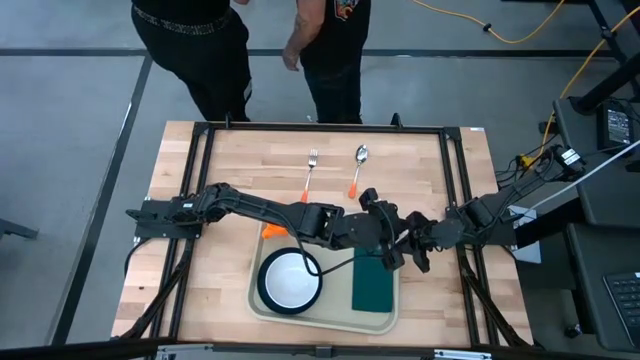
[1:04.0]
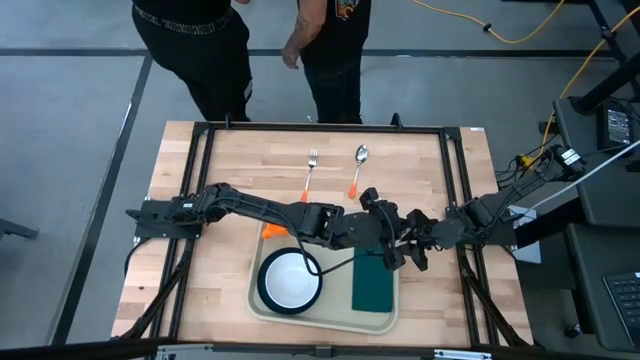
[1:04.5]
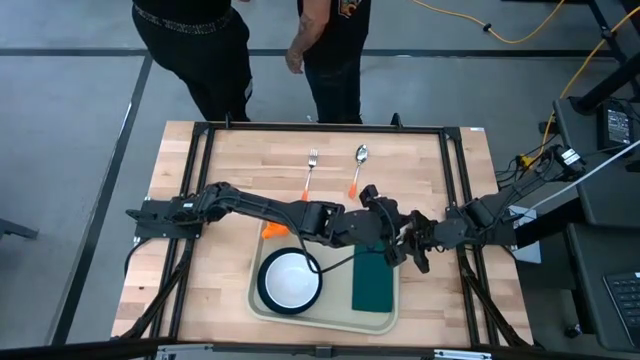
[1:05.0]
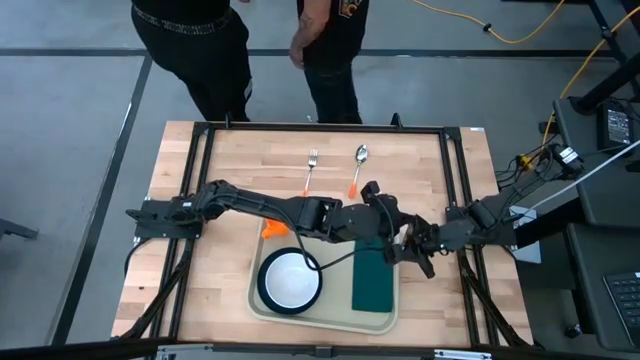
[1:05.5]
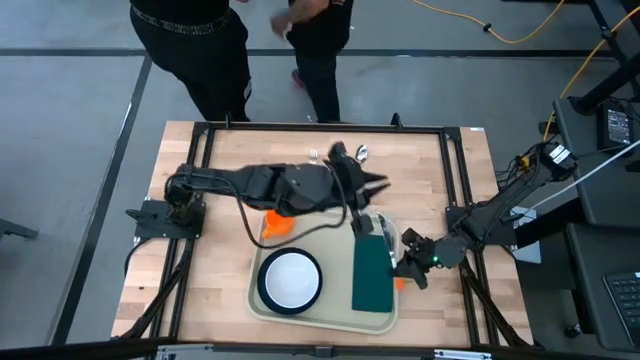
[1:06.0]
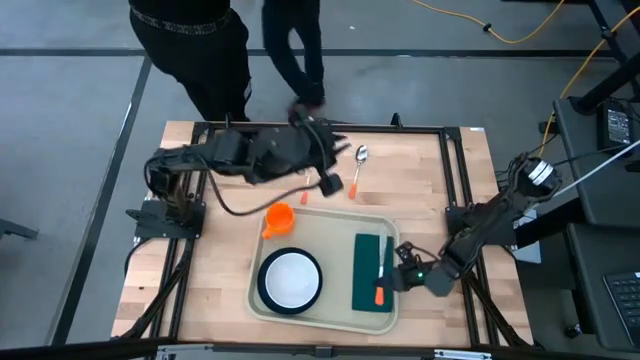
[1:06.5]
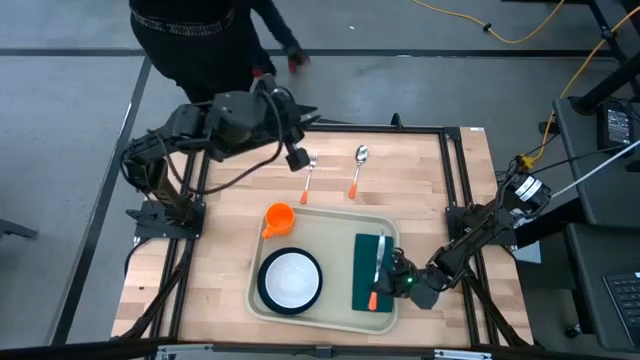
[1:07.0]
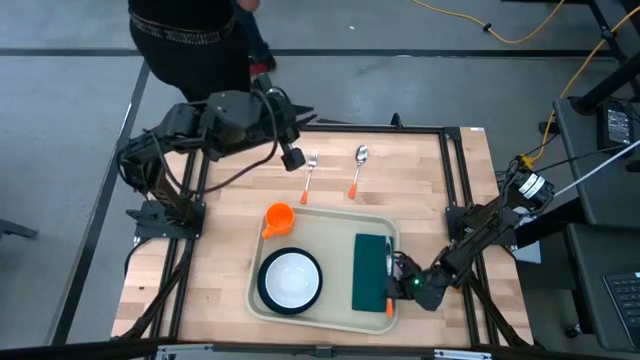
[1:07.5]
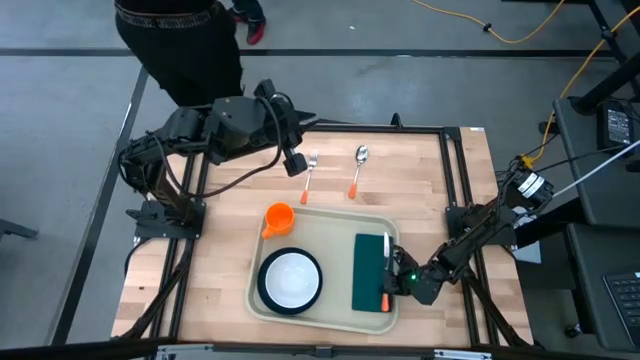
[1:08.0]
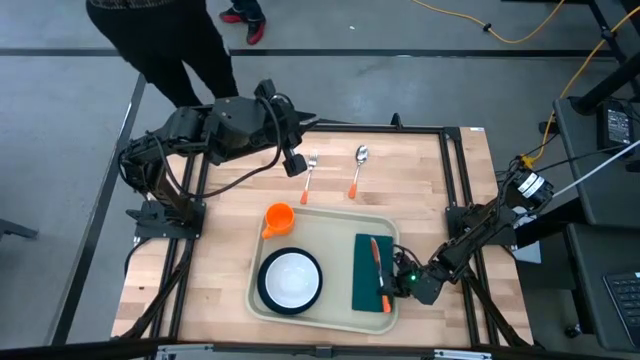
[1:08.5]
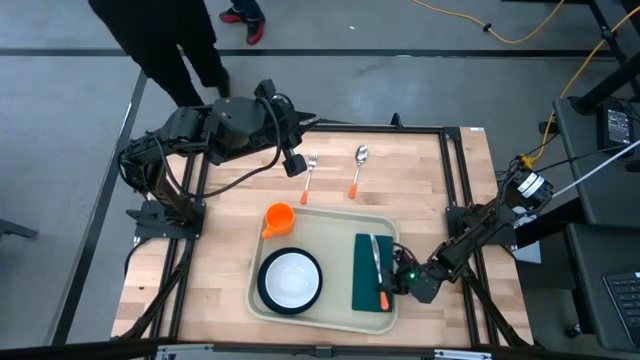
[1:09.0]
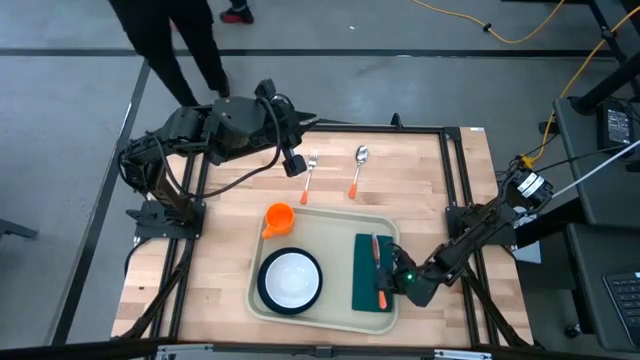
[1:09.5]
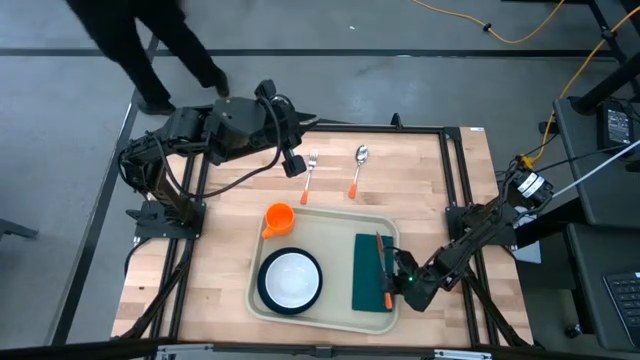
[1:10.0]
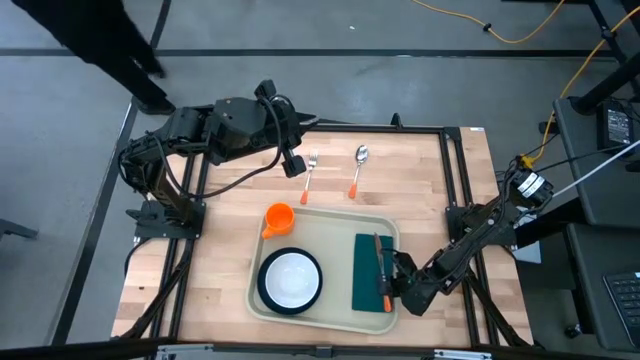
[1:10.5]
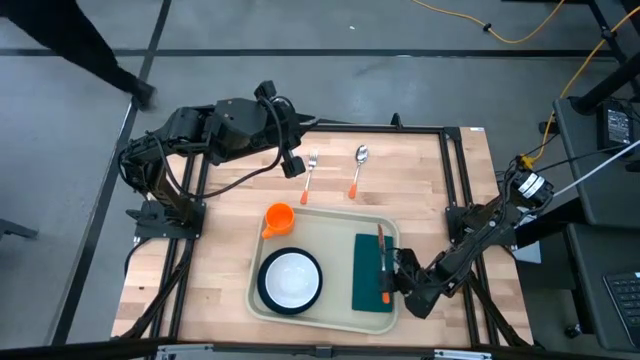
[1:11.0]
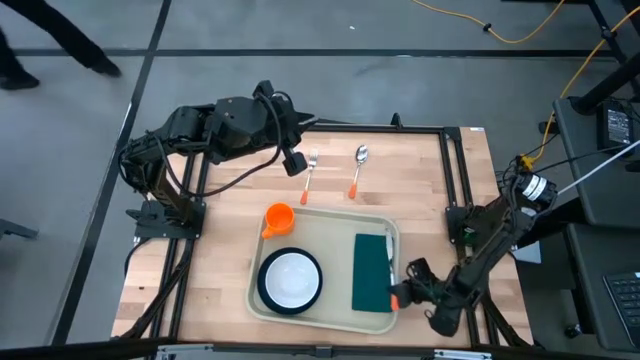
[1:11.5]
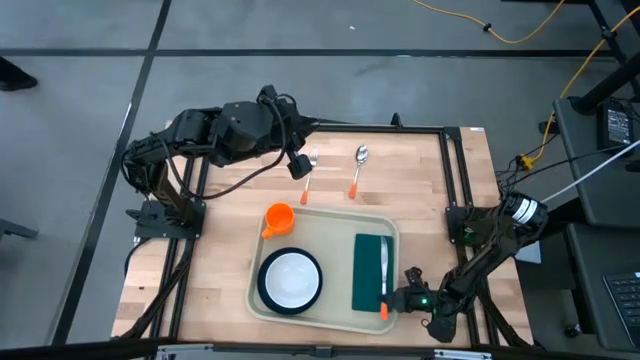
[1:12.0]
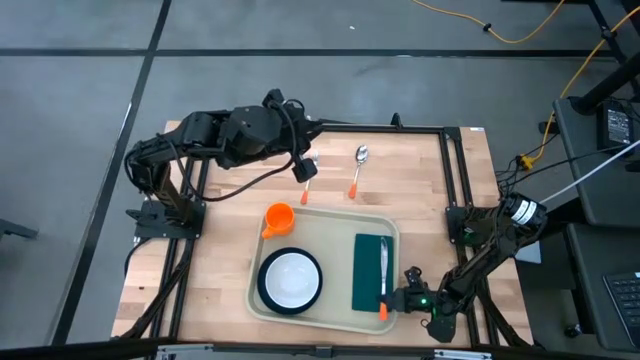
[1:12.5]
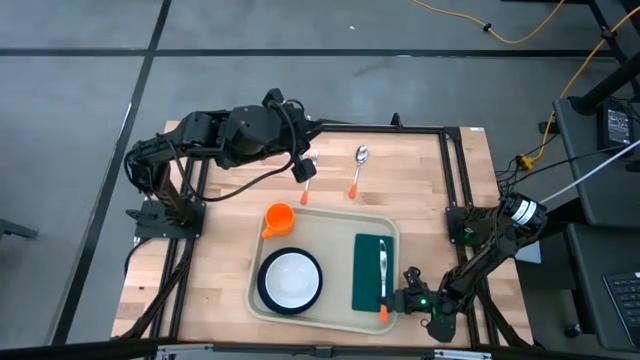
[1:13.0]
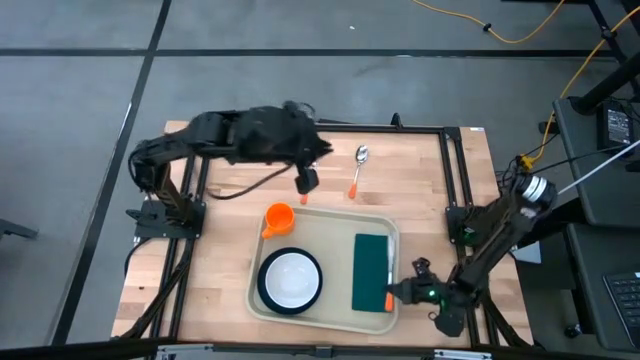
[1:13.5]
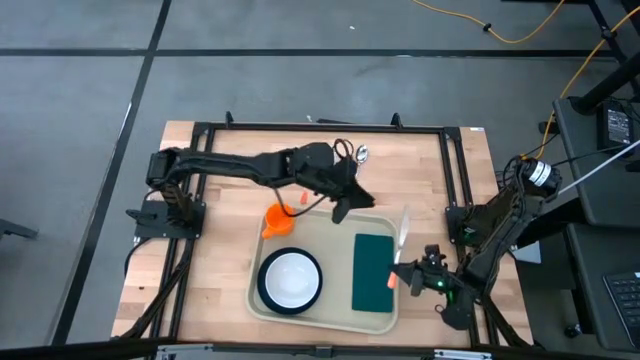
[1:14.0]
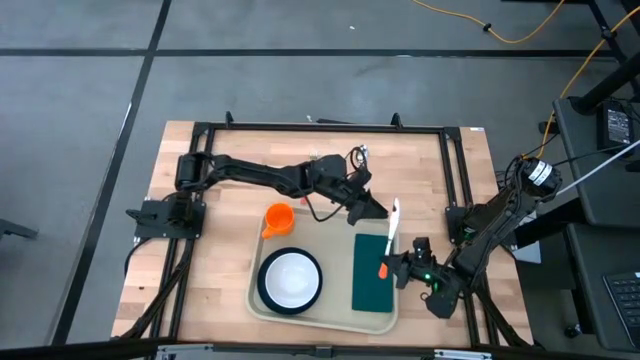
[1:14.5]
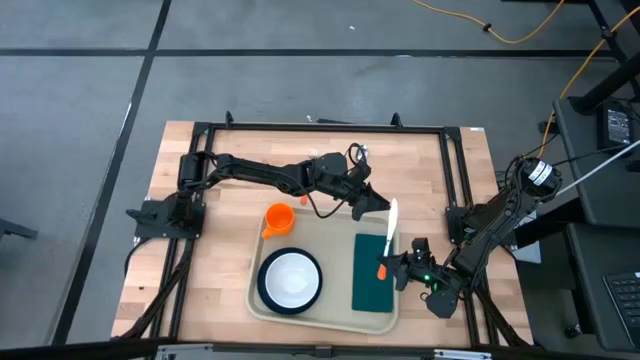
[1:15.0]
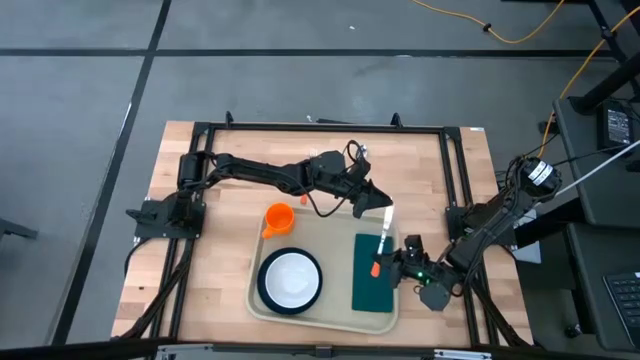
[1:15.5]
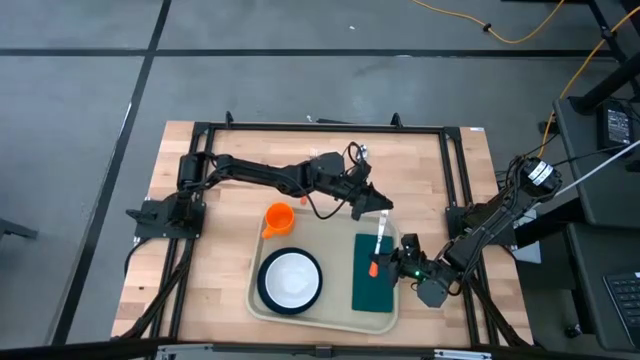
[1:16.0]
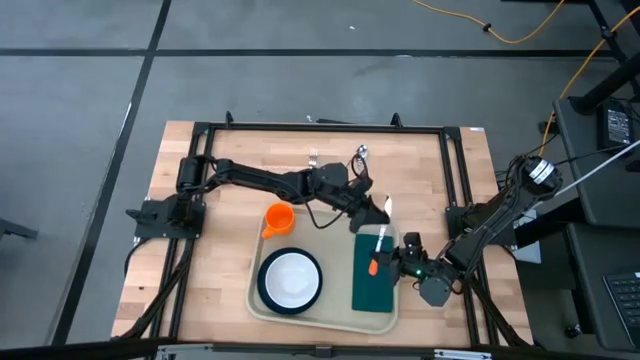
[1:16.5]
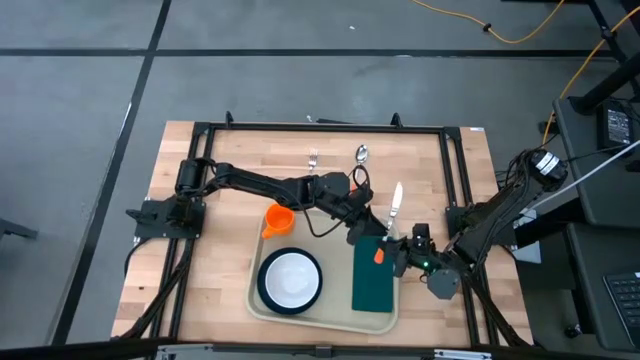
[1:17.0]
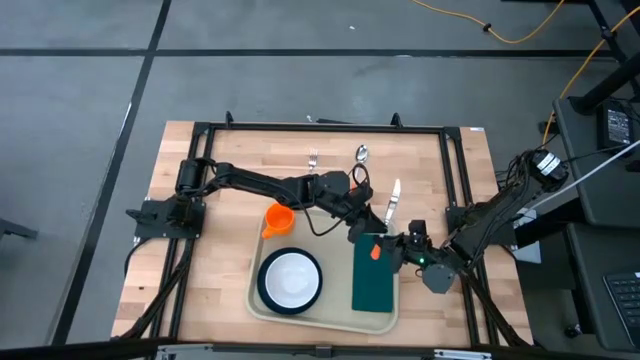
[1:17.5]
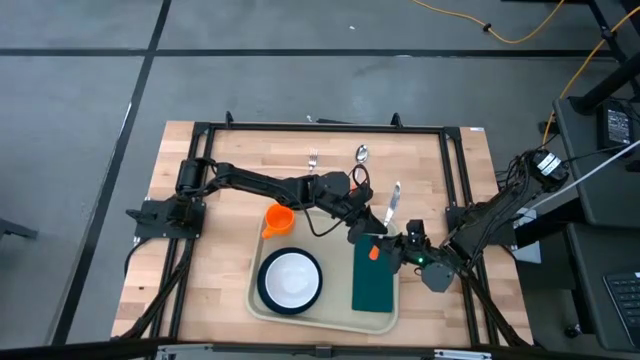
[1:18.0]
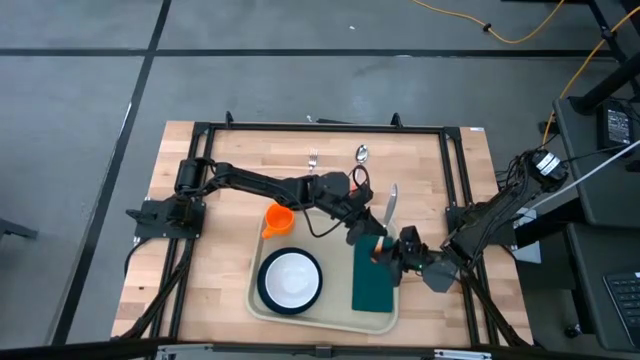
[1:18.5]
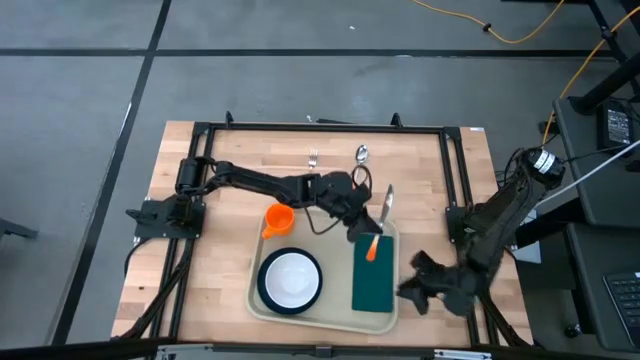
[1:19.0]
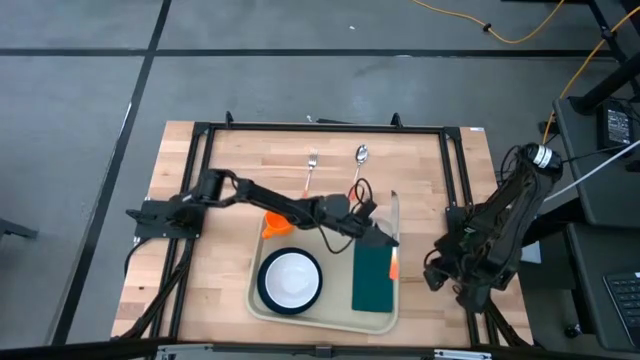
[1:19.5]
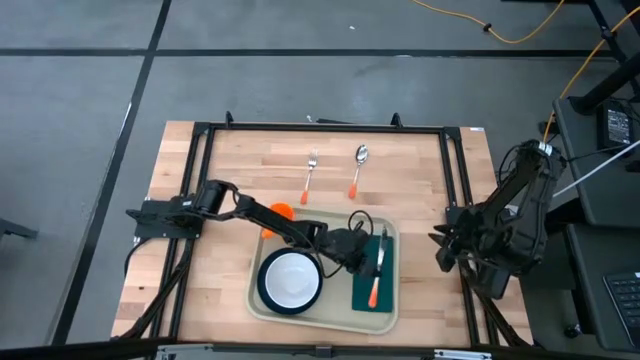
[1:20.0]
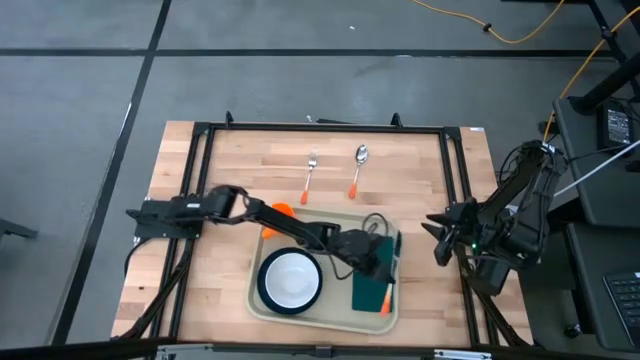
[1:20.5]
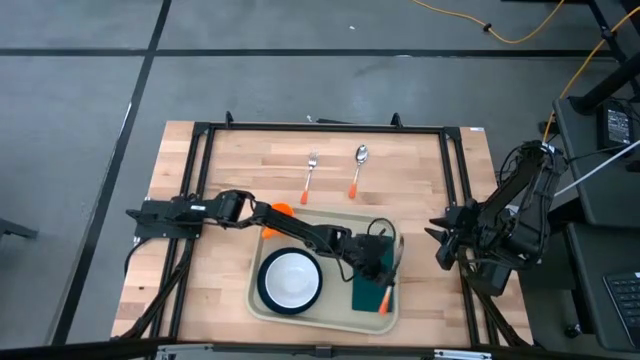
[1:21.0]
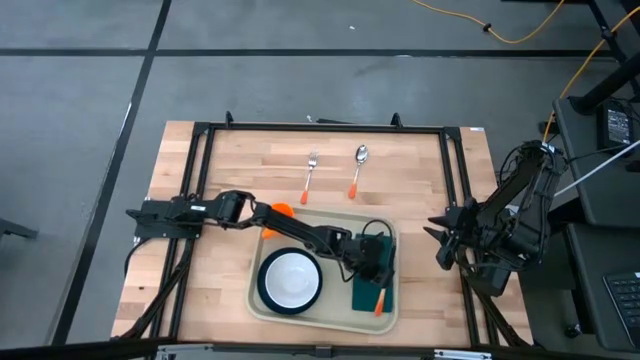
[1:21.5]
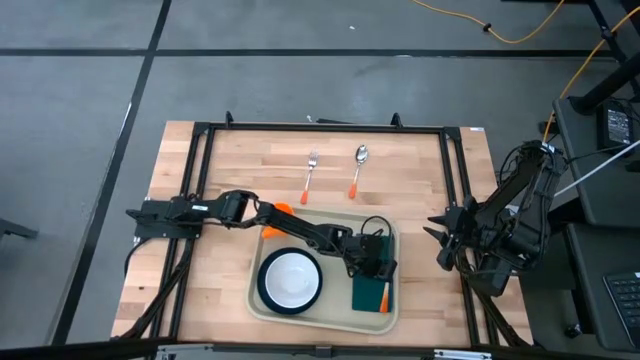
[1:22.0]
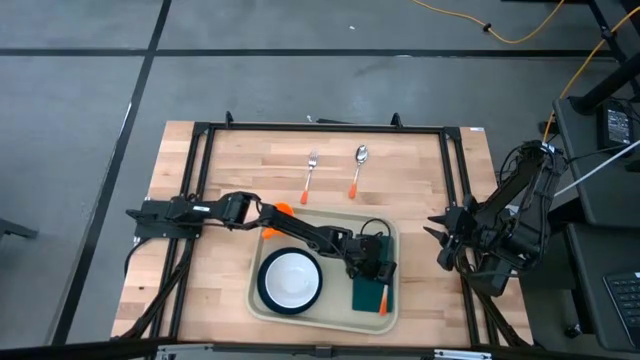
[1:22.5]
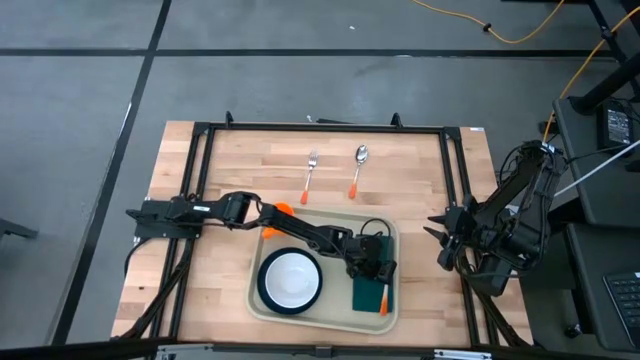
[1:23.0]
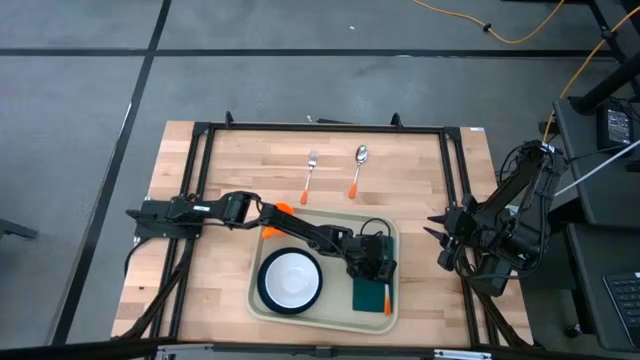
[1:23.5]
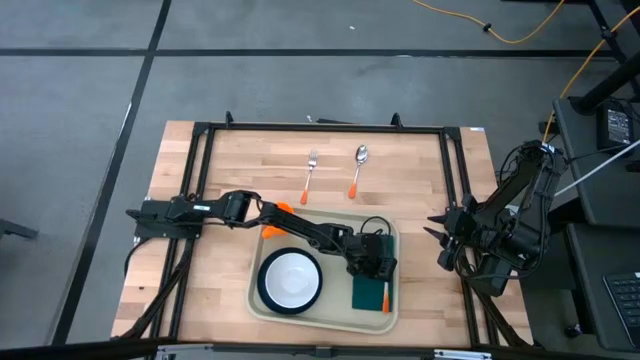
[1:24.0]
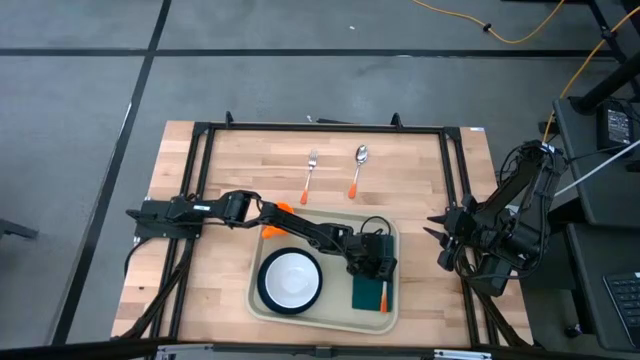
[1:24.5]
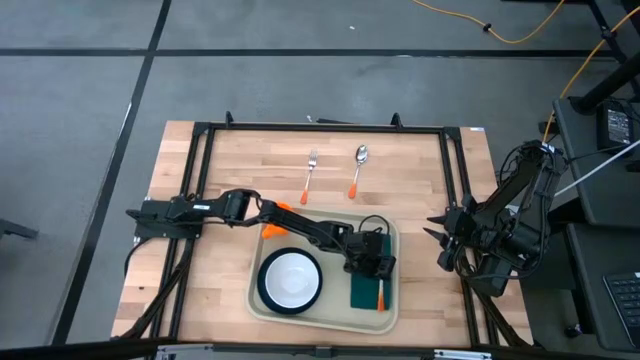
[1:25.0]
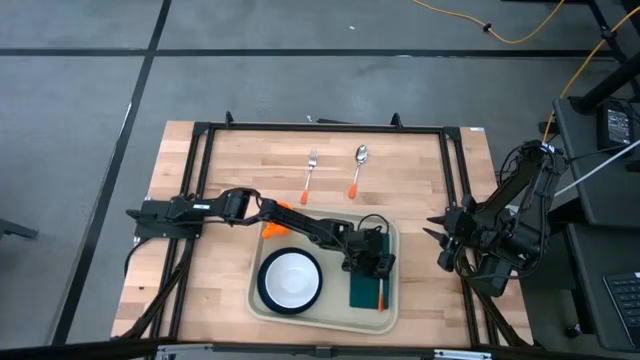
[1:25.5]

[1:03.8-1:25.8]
Task: Set up tray
Put the orange knife on the napkin

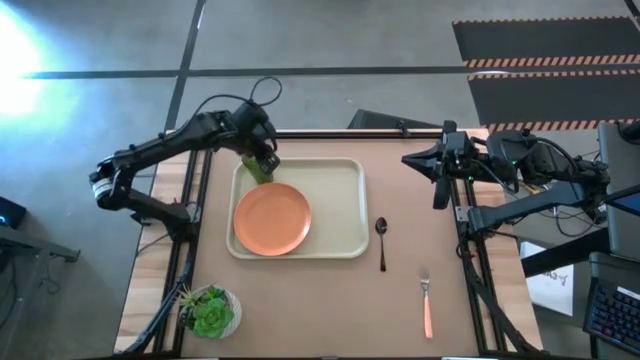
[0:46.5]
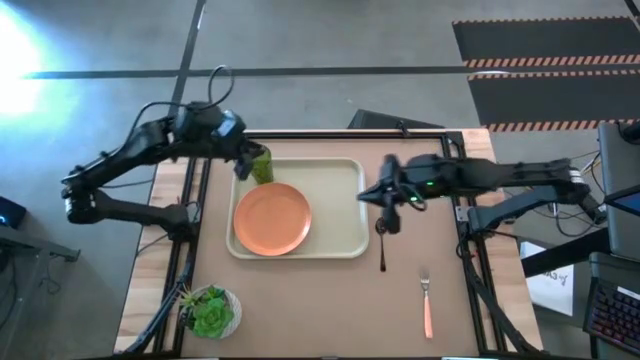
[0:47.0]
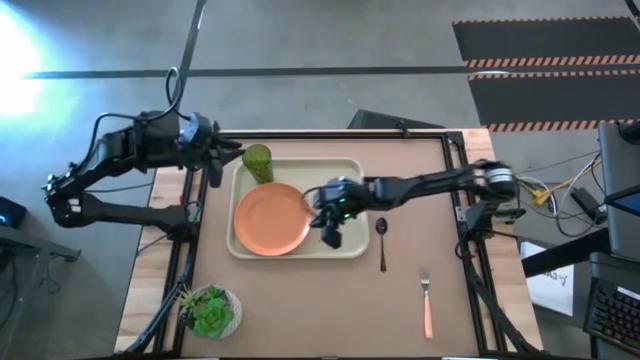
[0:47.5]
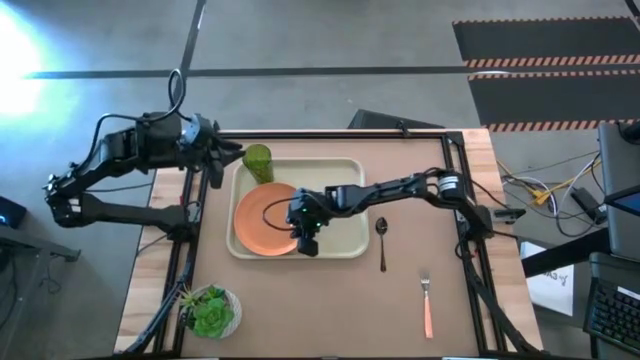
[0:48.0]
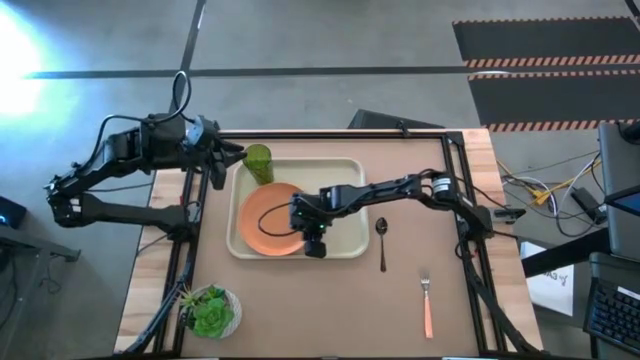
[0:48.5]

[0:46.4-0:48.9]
Task: Pick and place plate/cup/fork/spoon on tray
Adjust the orange plate on the white serving tray
